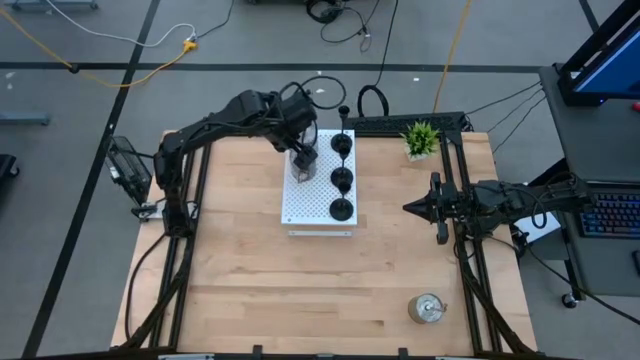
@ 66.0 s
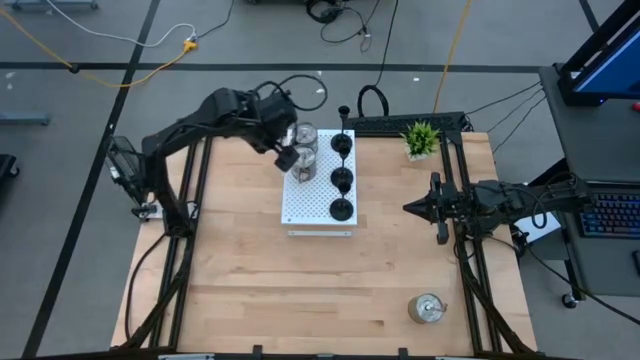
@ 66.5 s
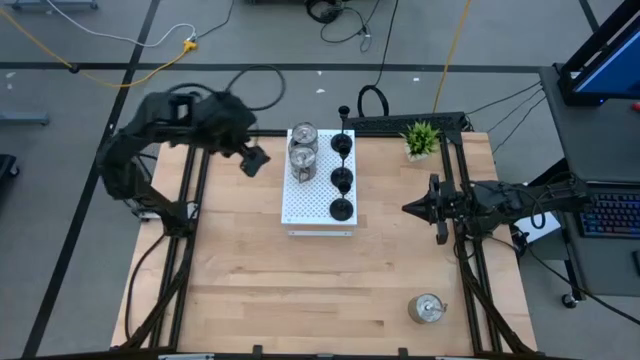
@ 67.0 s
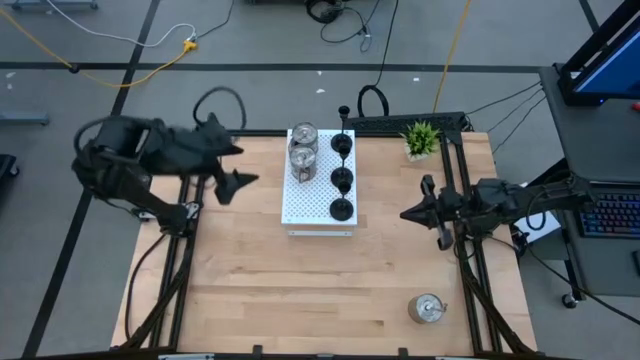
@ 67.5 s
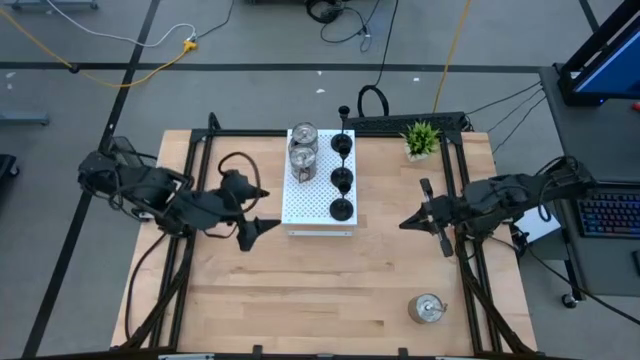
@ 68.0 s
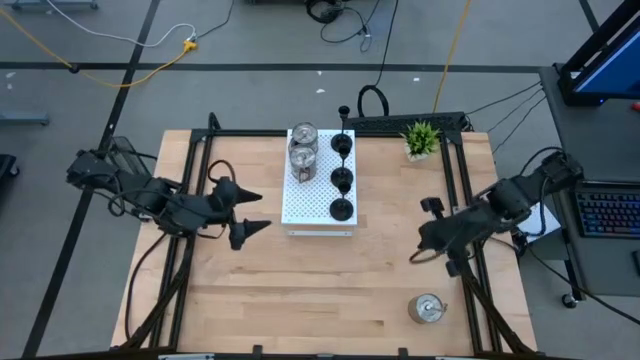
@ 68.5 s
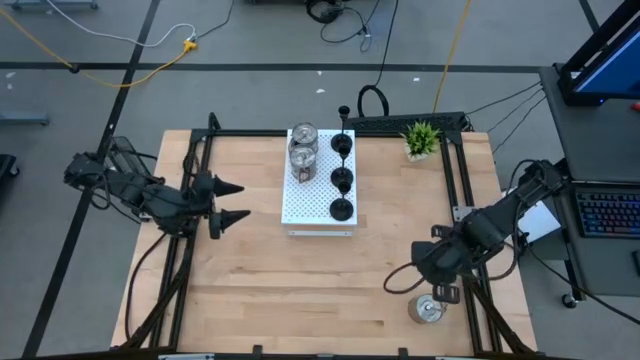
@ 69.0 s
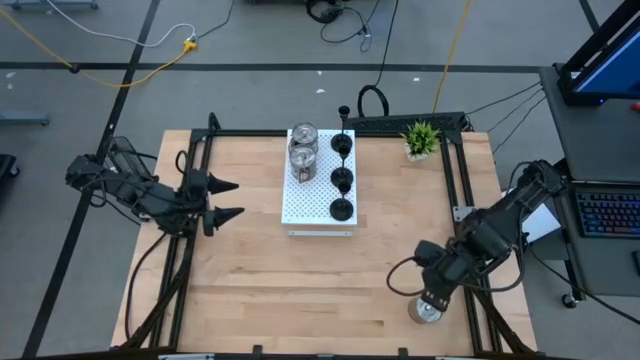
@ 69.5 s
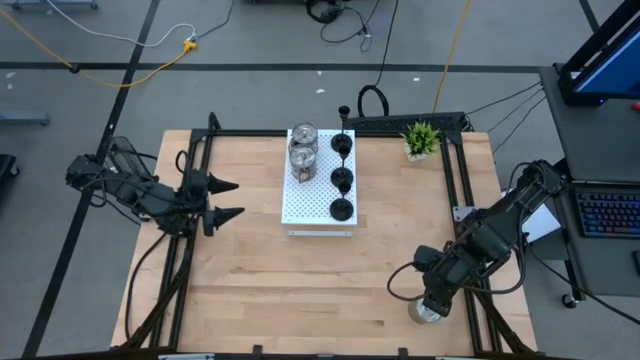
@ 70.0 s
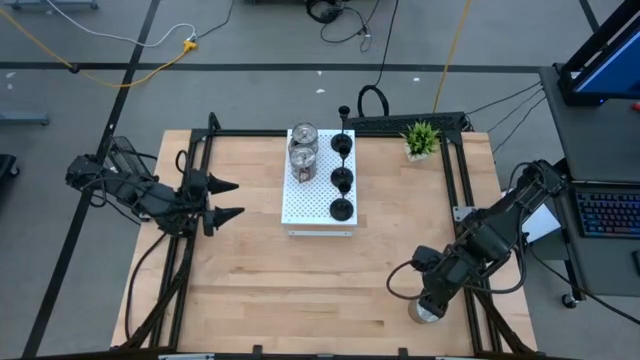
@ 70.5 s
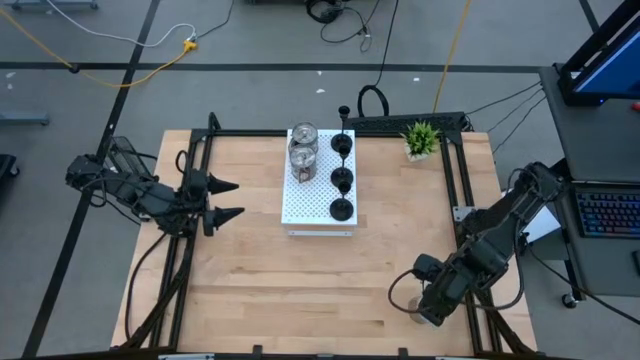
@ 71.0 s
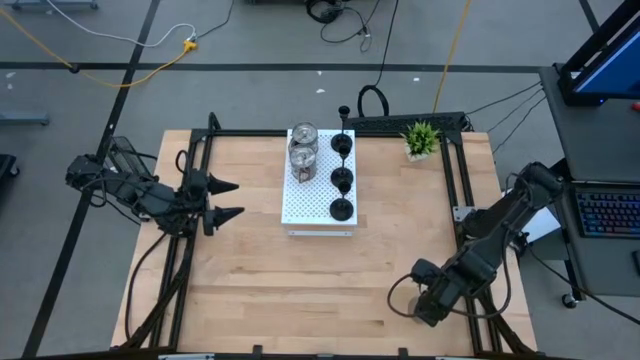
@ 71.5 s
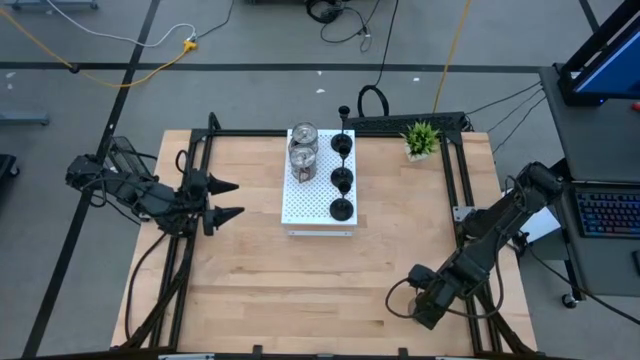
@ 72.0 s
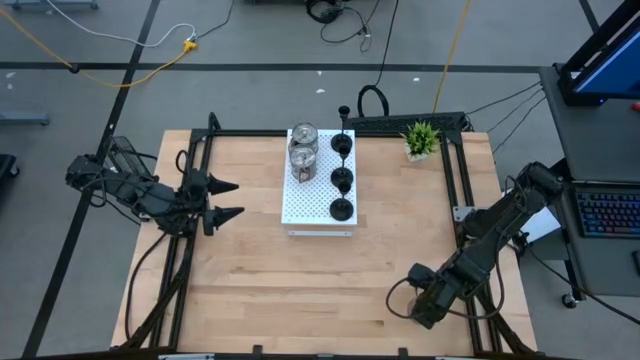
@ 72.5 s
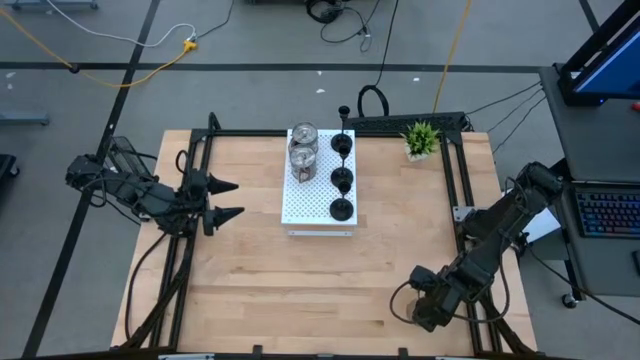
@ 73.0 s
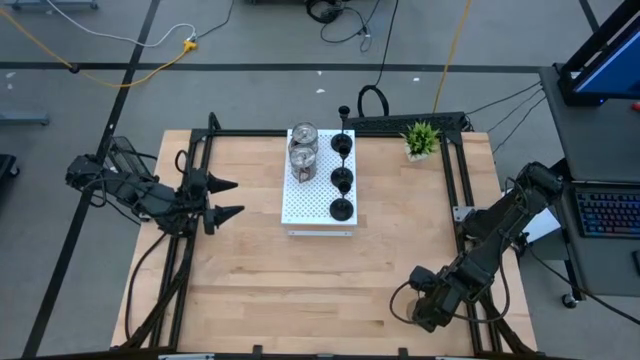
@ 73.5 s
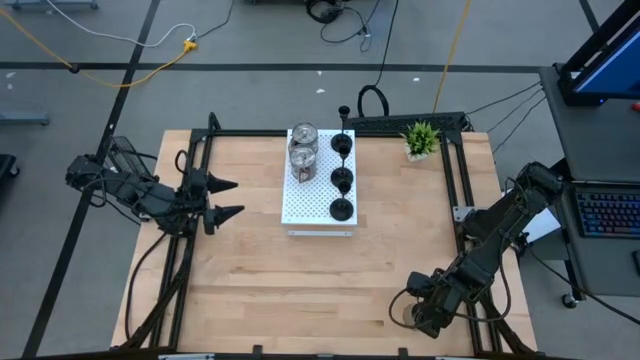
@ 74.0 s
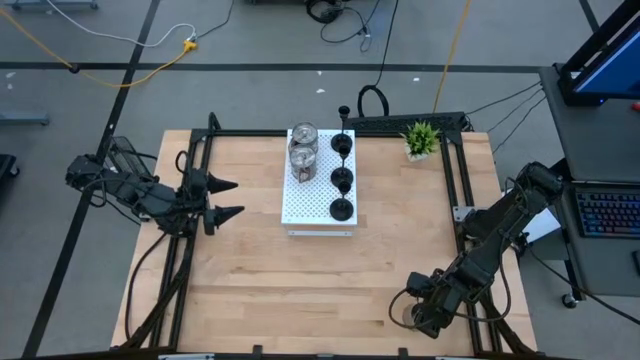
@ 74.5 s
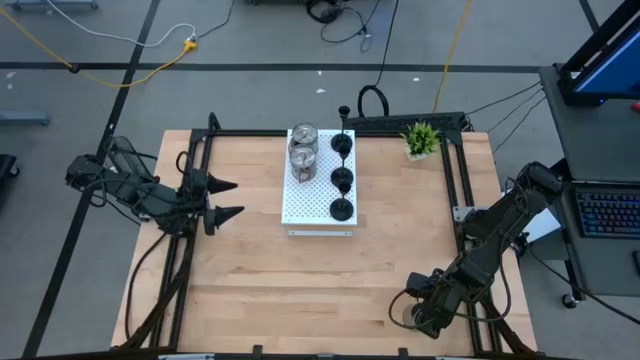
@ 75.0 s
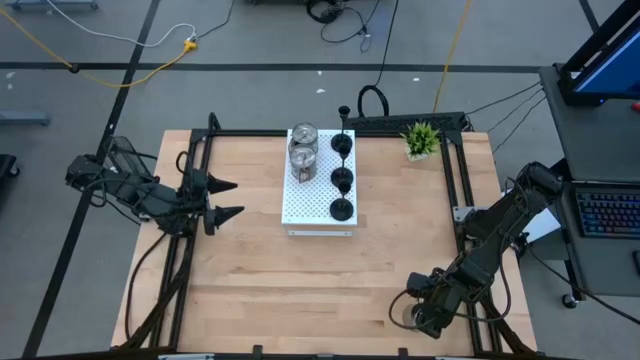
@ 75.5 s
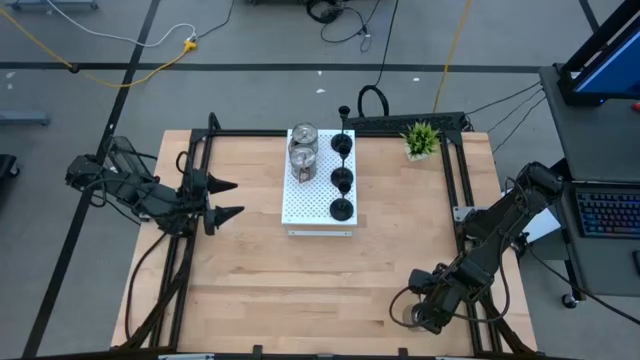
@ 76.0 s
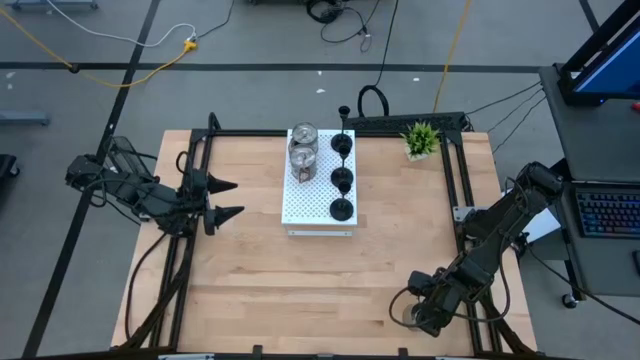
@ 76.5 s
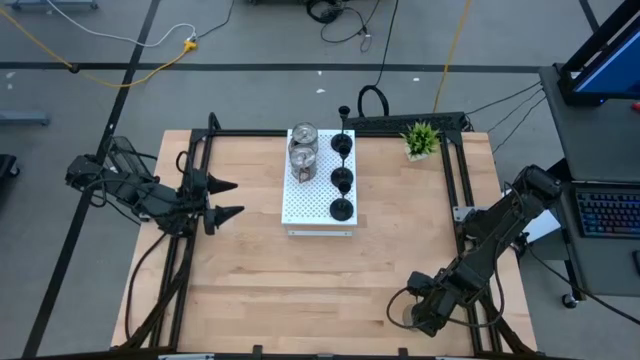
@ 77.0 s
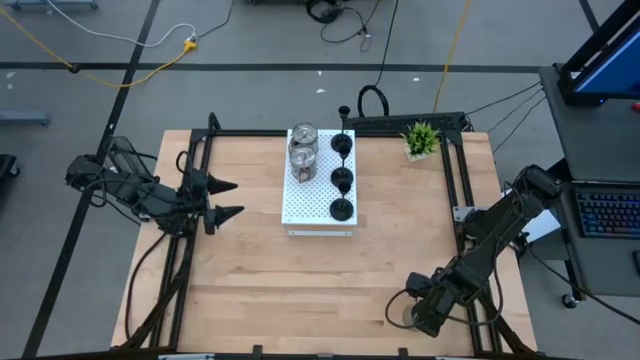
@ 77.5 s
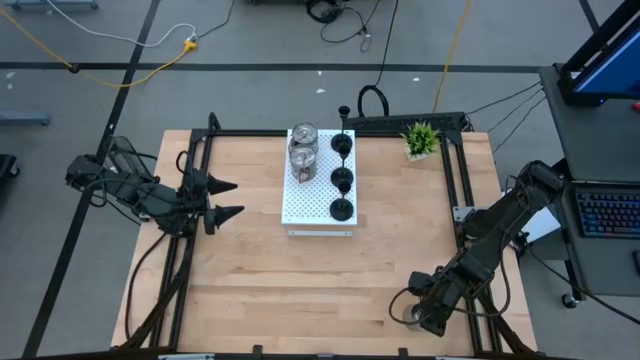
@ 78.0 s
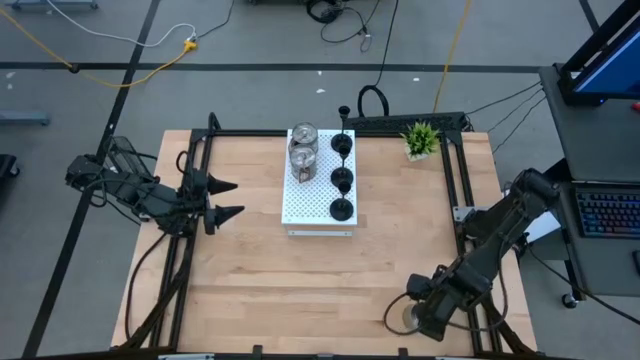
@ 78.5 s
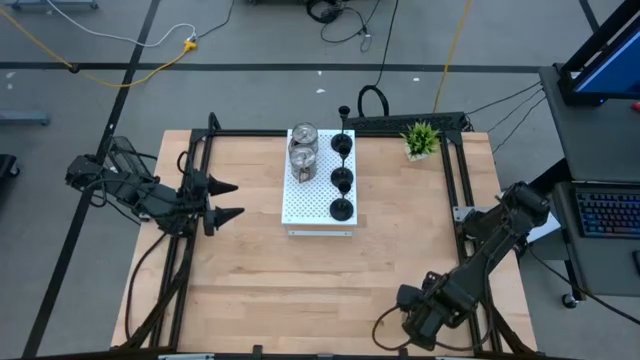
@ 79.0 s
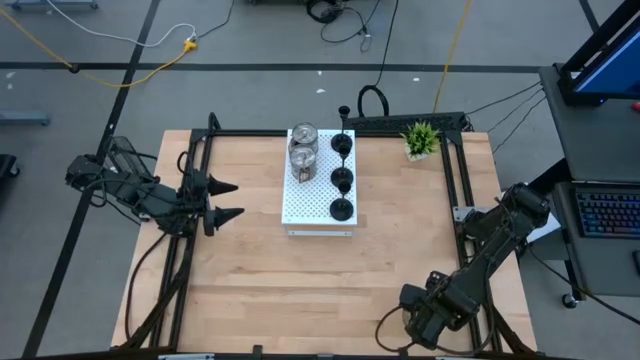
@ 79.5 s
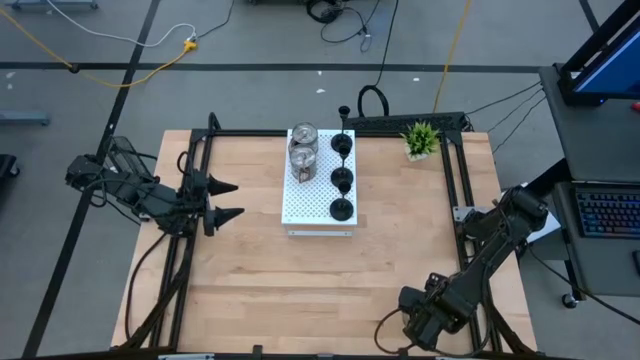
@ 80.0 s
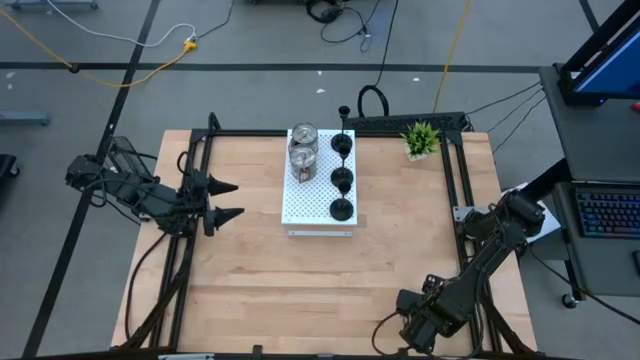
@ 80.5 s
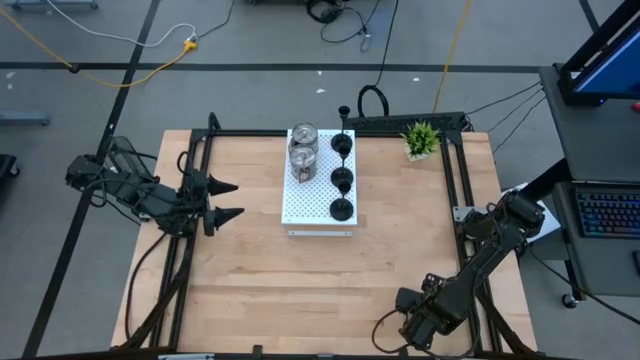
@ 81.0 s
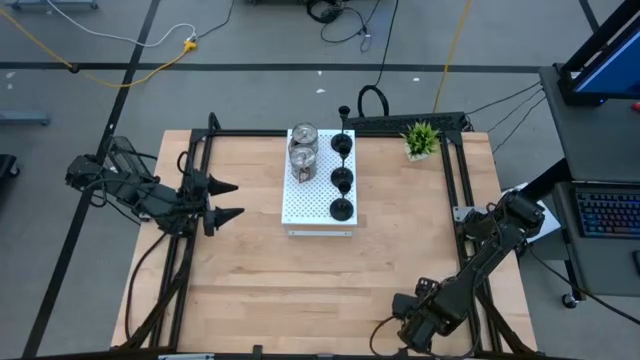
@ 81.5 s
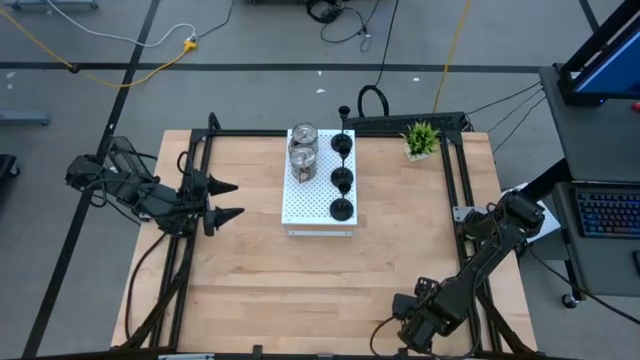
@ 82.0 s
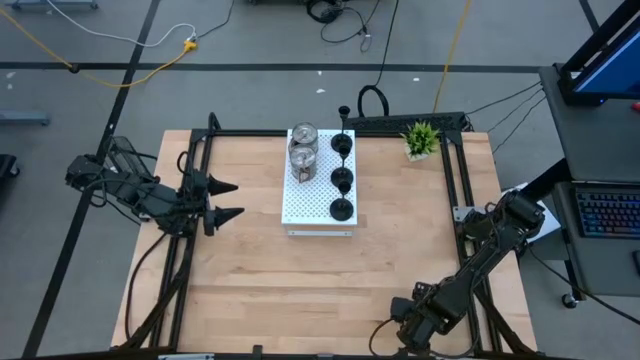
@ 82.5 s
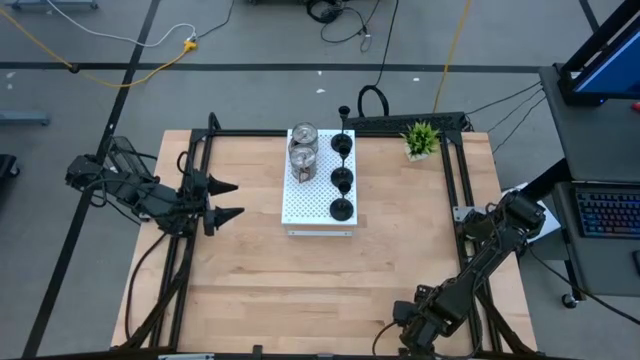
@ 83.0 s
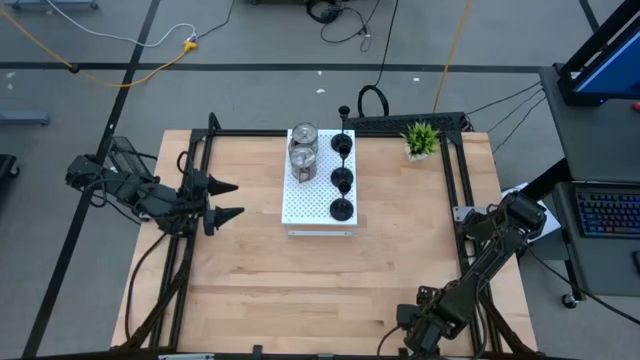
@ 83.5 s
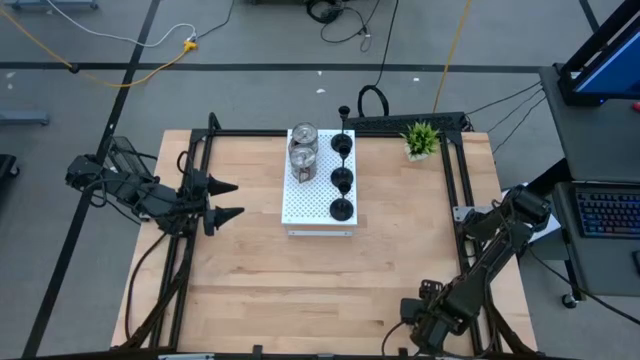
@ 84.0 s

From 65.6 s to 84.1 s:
Task: Pick & Place candle stick holders
Put the silver scented candle on the shelf aligned with the other silver scented candles

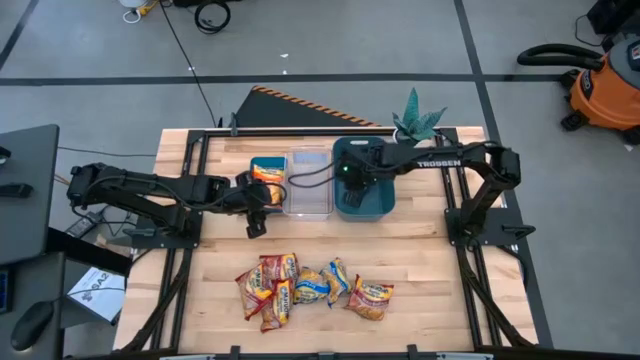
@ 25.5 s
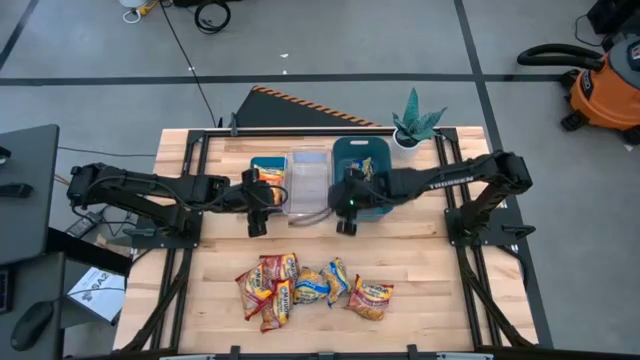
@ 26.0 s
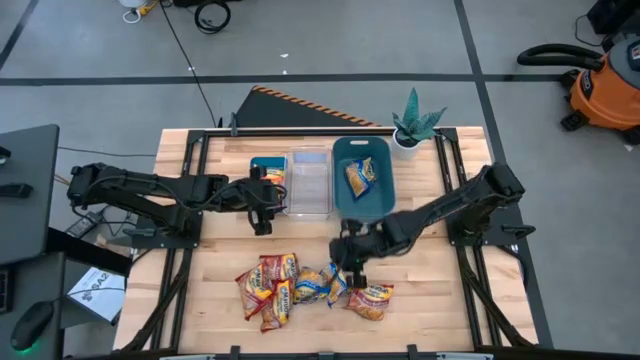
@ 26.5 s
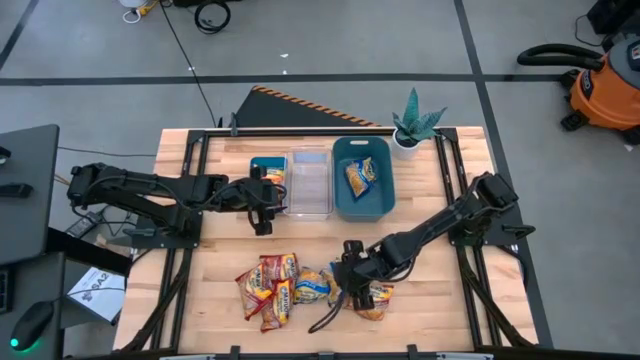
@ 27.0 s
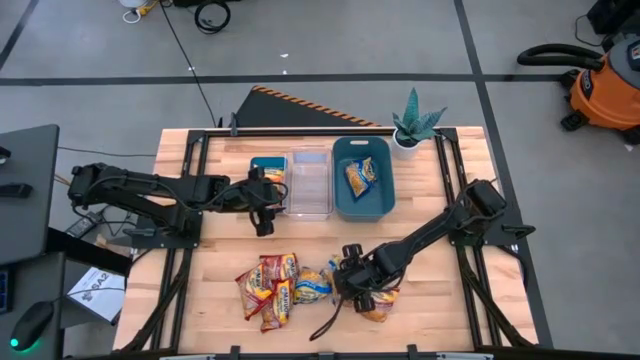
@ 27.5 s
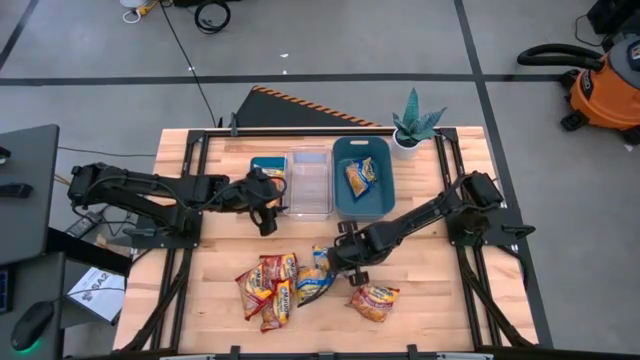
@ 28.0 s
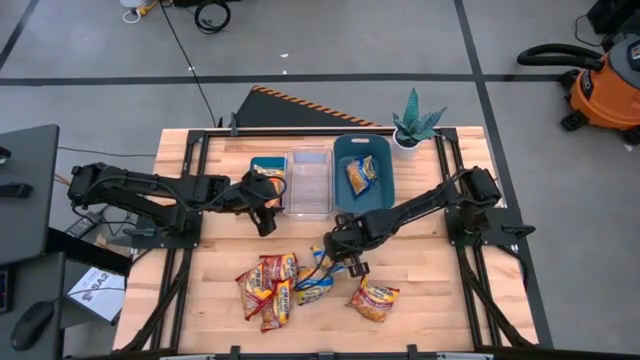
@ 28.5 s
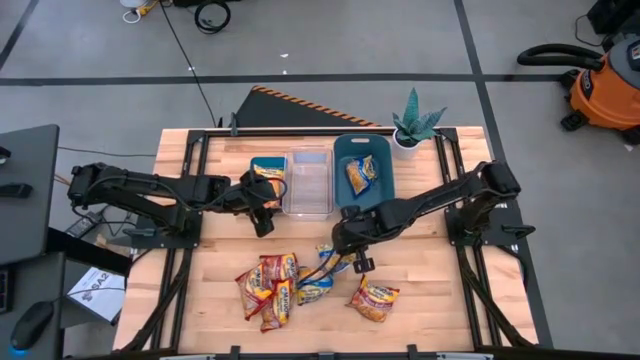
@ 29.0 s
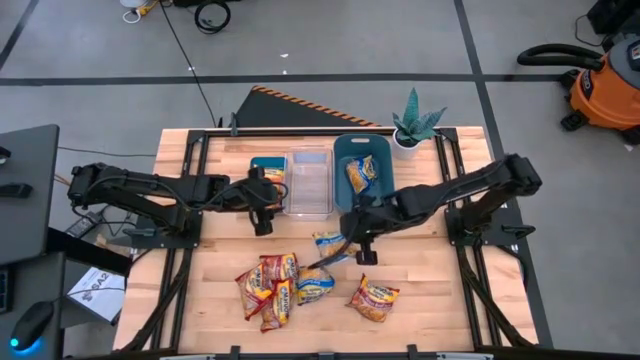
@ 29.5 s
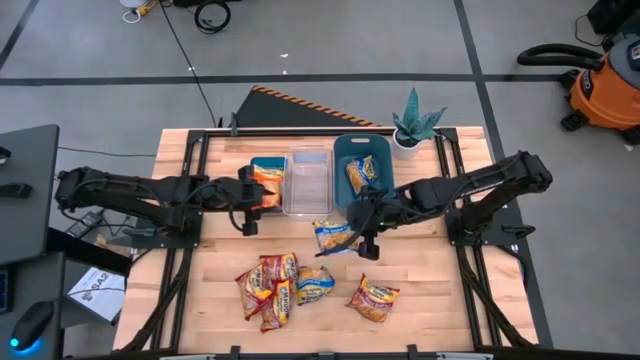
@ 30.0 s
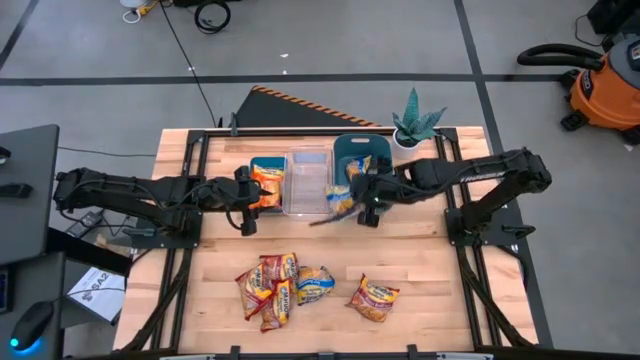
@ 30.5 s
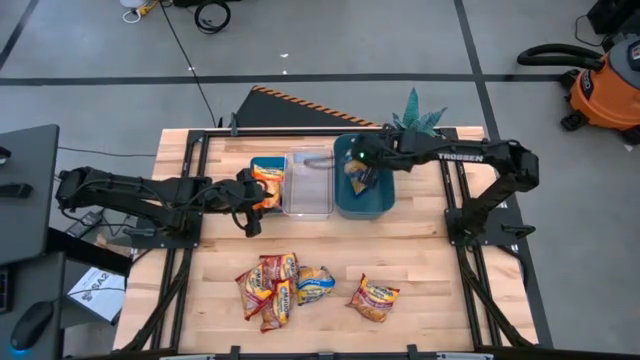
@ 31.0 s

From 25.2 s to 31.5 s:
Task: Sort Maruchan noodles
Put the blue noodle pack into the dark blue bin
